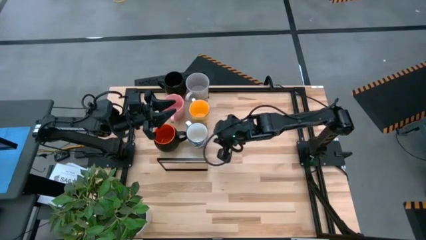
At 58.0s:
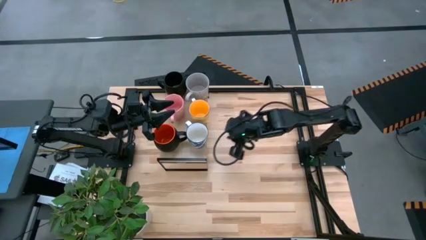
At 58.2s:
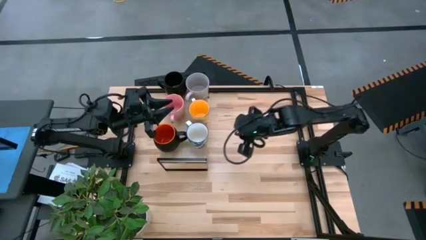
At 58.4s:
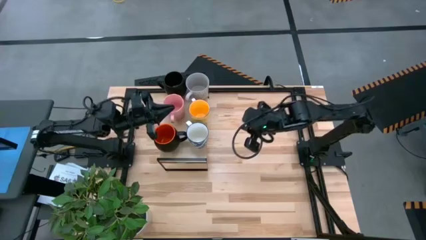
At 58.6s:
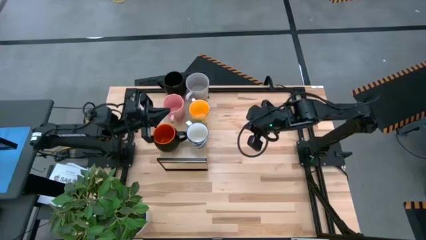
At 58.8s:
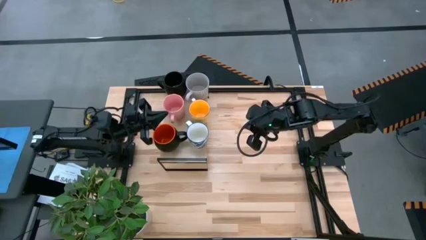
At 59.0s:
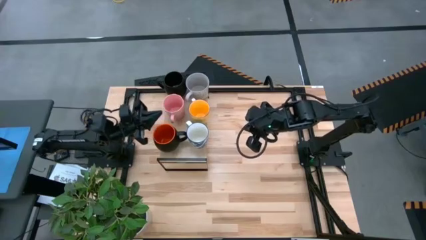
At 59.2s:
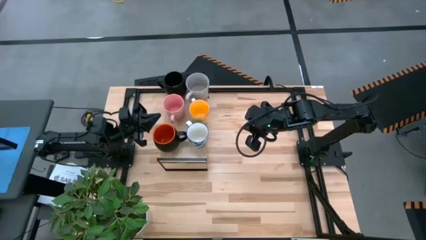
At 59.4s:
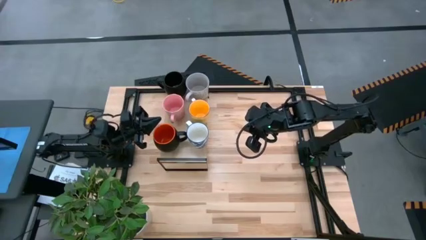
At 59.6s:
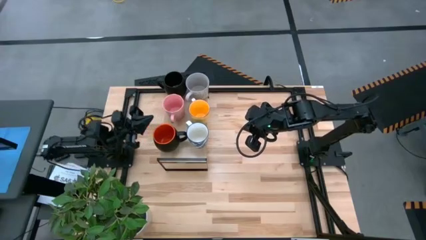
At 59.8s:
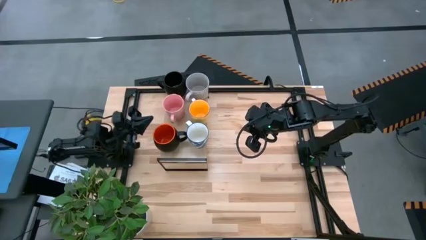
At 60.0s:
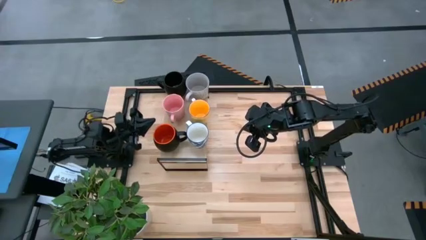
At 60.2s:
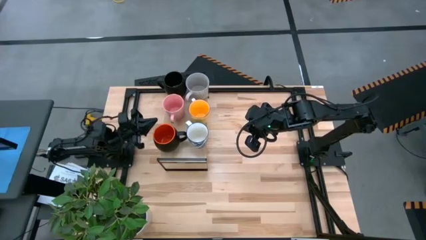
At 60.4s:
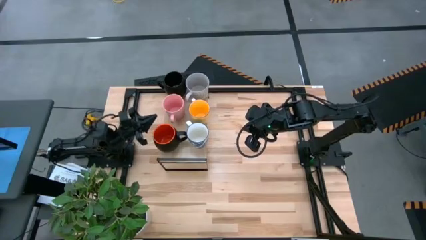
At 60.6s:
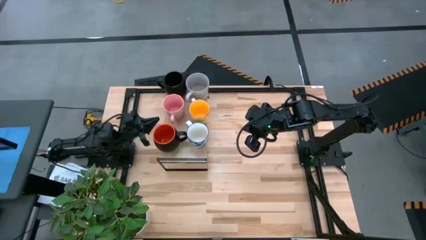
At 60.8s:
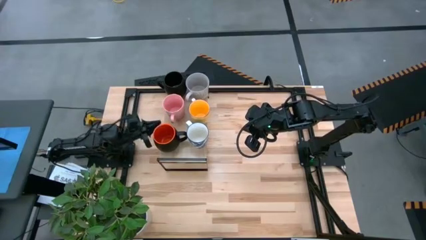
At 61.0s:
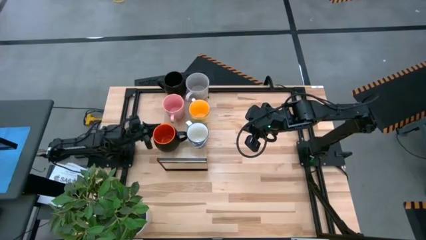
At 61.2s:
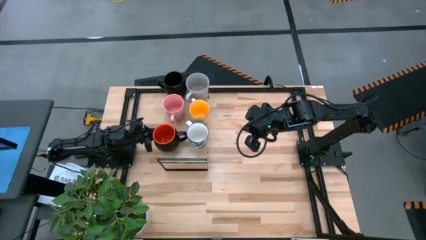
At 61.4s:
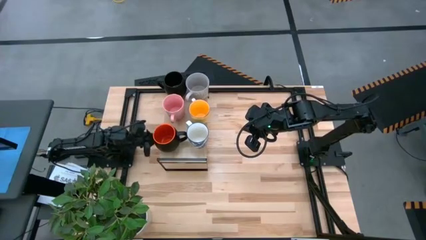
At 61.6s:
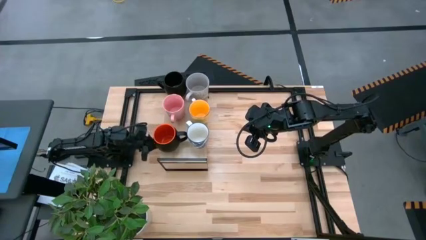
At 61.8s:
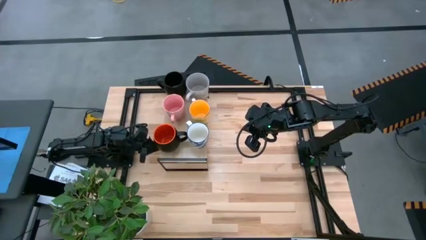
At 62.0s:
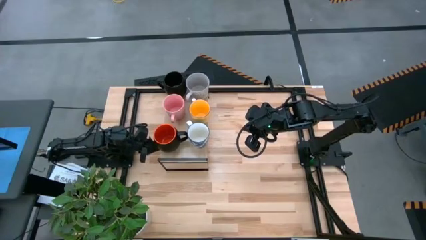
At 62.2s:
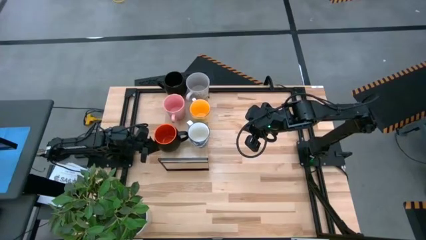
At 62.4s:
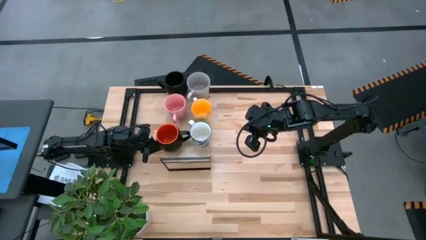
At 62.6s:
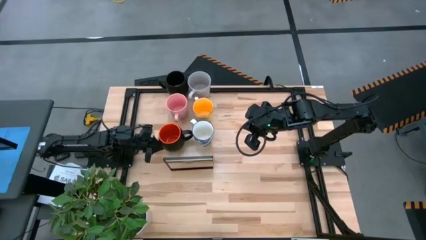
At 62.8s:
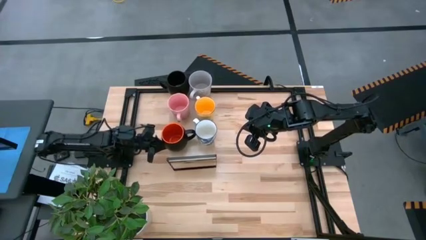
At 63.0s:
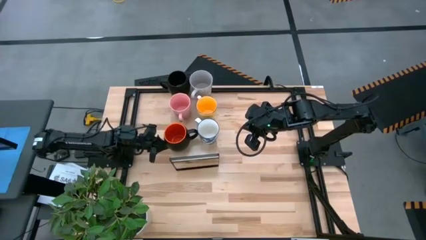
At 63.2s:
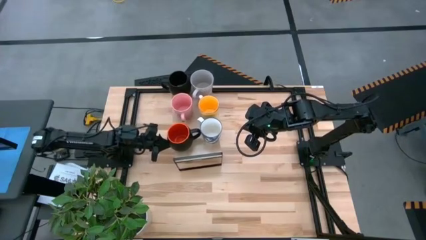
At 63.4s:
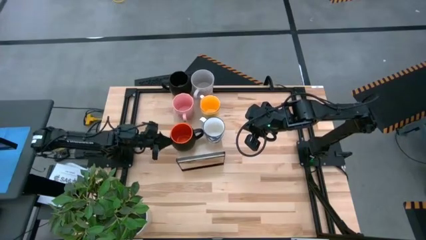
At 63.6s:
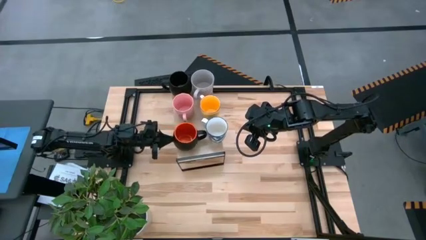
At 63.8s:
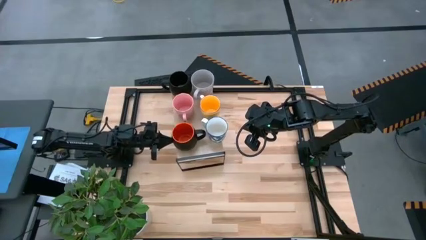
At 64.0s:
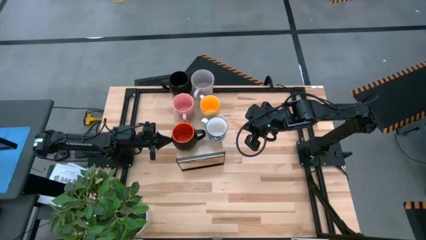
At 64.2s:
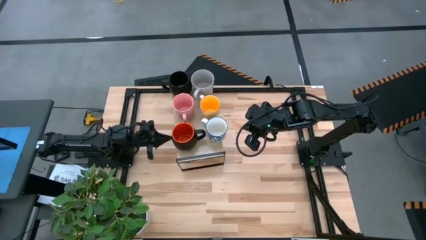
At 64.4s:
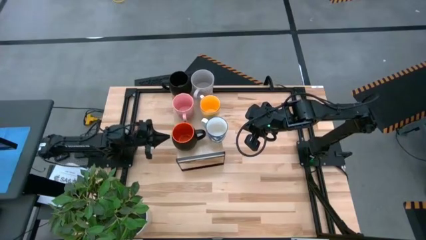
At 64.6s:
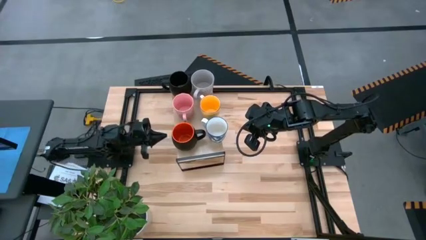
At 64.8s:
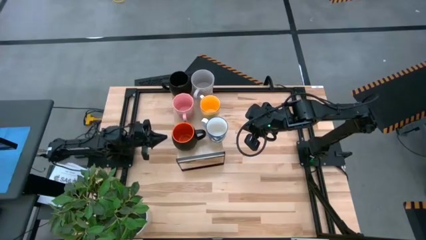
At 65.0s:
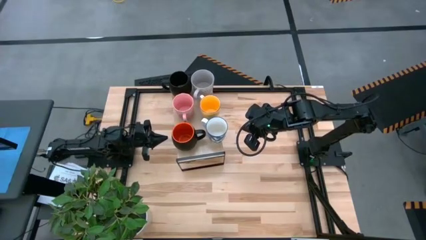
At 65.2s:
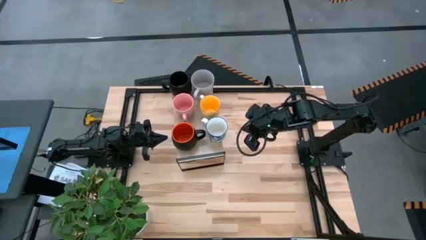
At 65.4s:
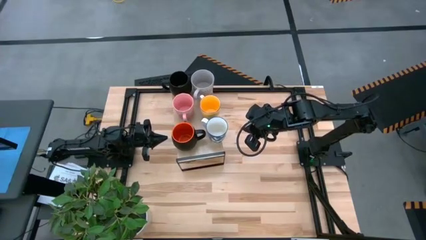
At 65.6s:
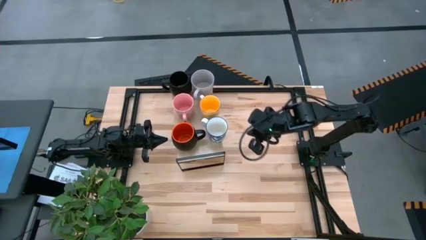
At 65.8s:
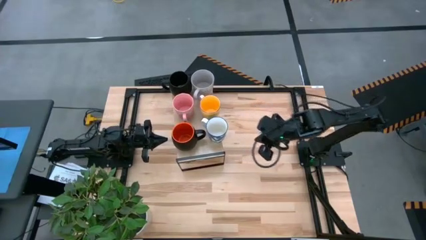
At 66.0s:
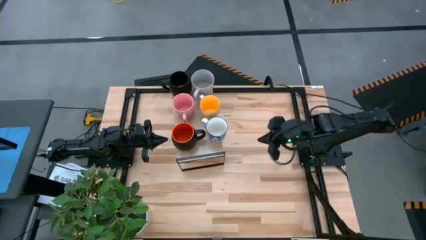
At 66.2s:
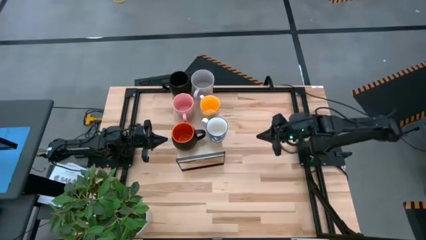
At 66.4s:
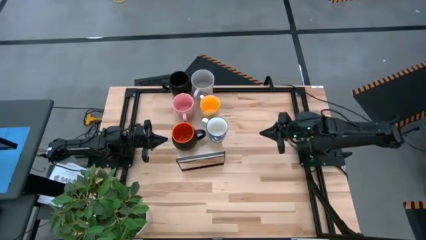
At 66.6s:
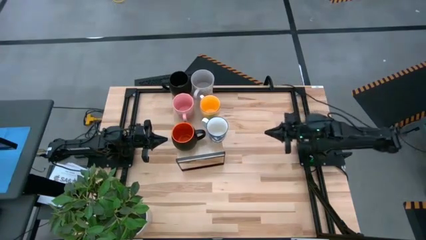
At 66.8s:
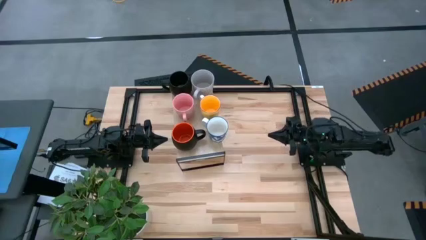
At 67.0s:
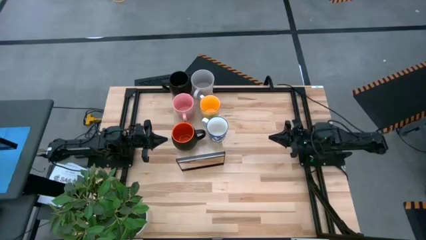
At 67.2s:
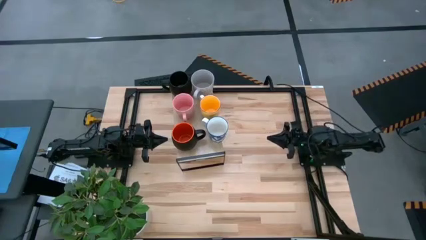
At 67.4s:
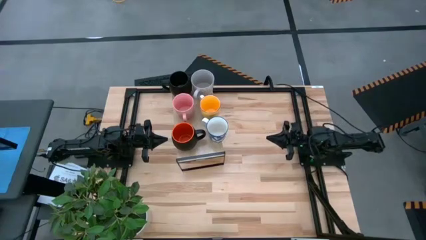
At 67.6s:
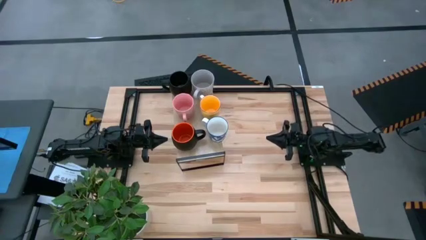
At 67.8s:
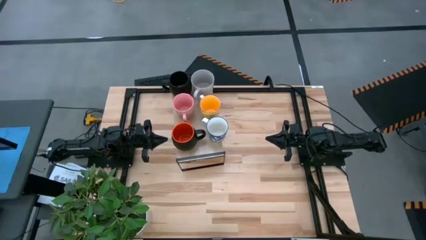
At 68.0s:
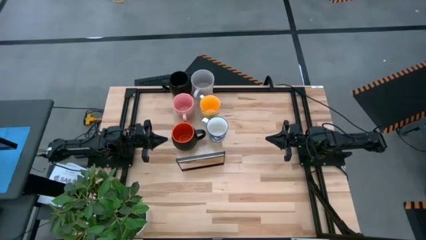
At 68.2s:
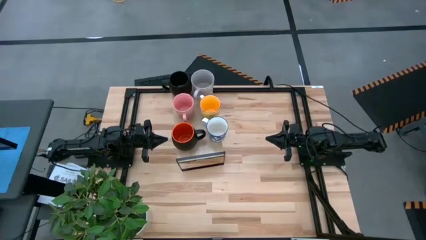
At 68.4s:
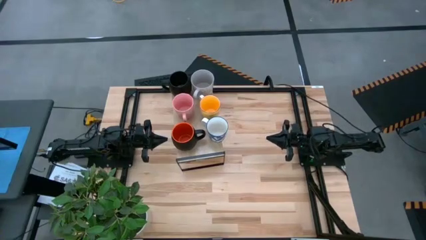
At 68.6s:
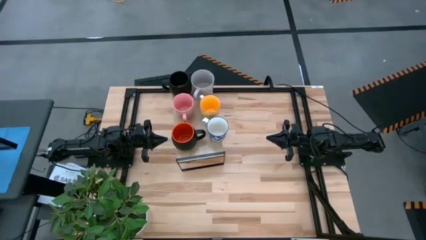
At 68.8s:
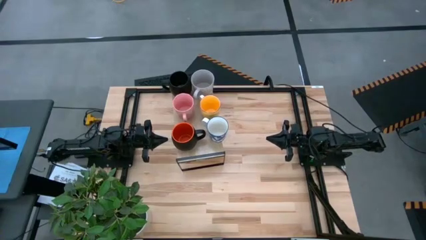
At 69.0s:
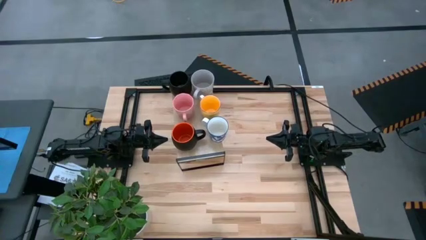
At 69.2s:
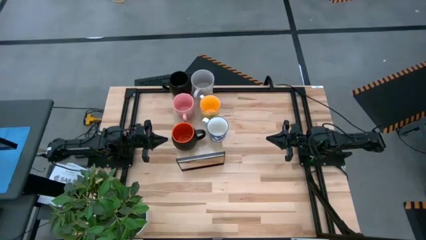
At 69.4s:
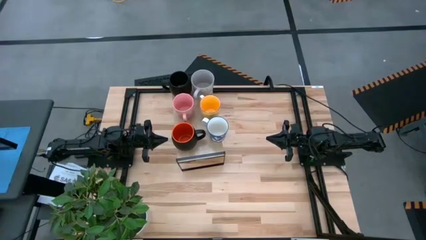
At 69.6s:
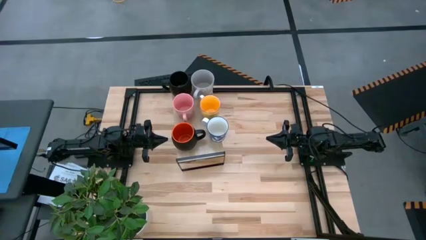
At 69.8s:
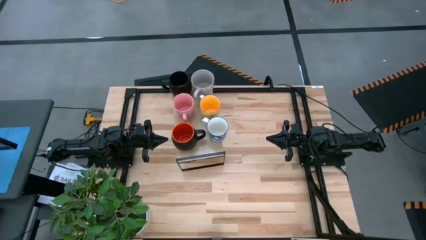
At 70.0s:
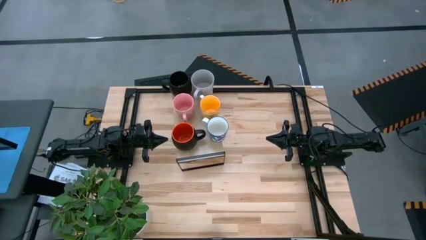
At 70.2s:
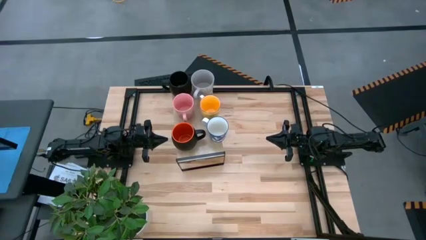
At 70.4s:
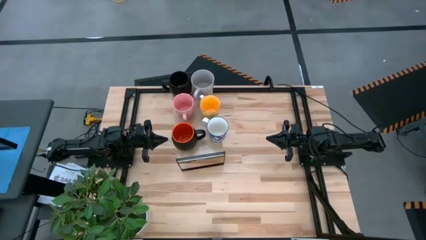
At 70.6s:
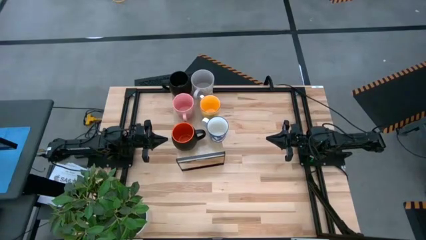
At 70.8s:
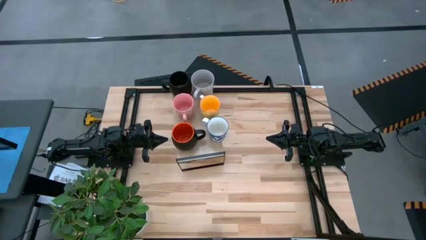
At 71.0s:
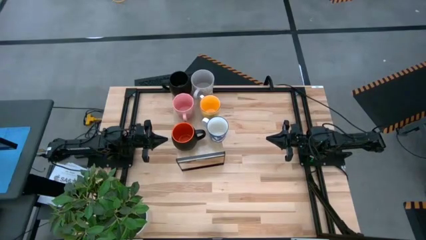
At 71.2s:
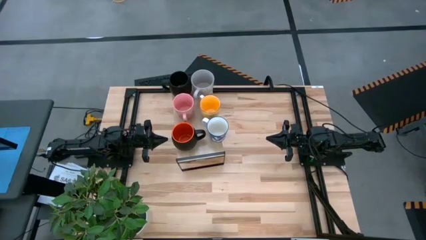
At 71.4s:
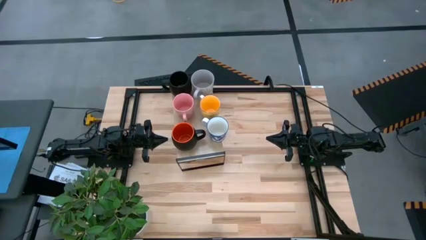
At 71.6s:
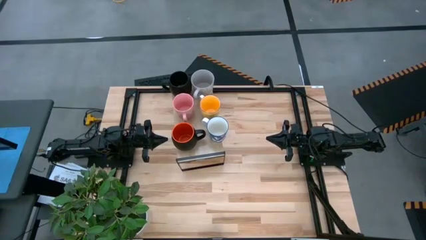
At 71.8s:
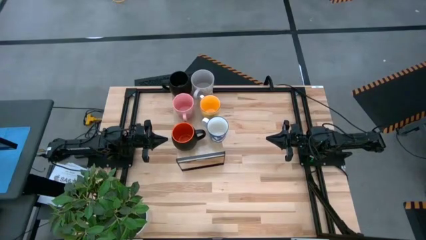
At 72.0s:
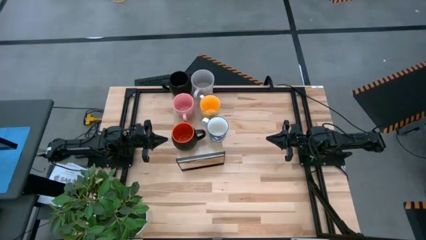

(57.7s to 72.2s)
Task: Place coffee mugs
Return to Home Position
